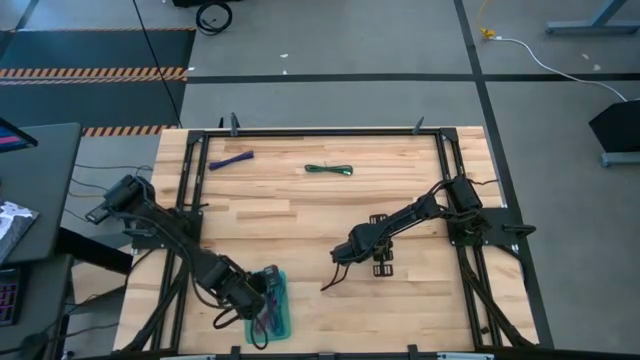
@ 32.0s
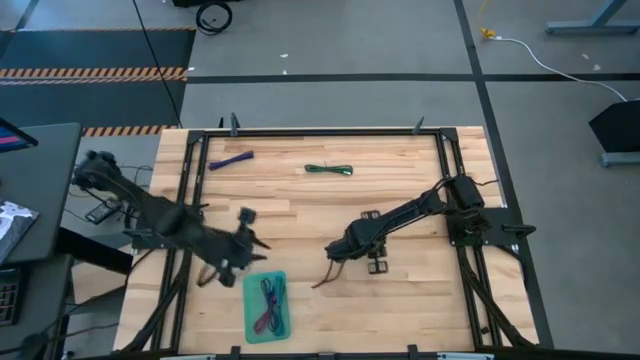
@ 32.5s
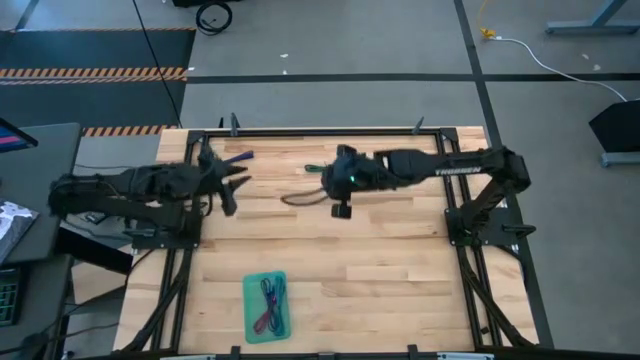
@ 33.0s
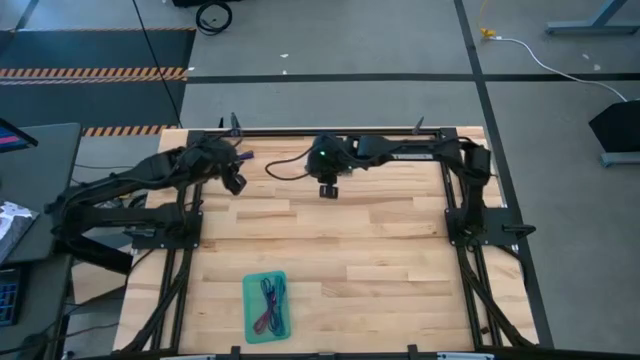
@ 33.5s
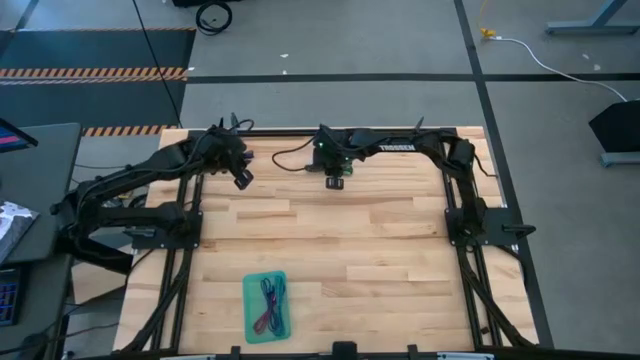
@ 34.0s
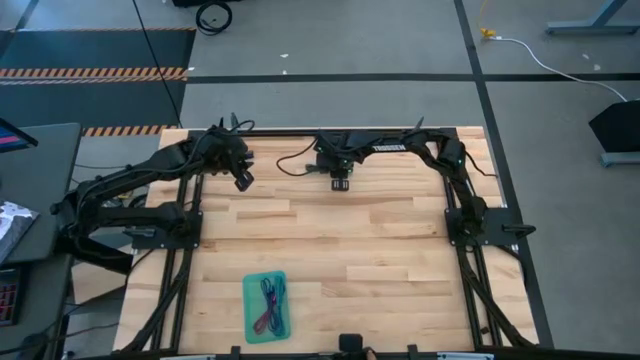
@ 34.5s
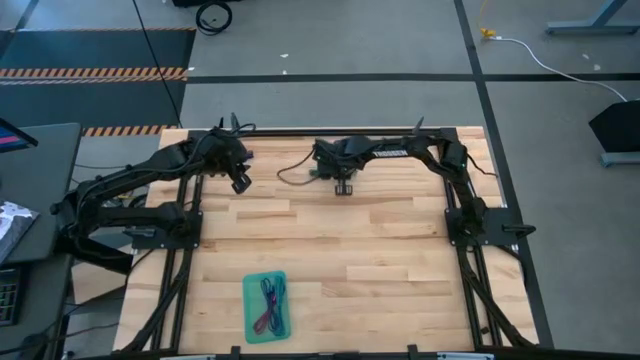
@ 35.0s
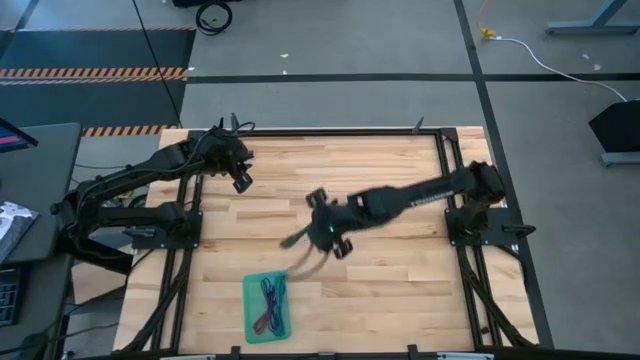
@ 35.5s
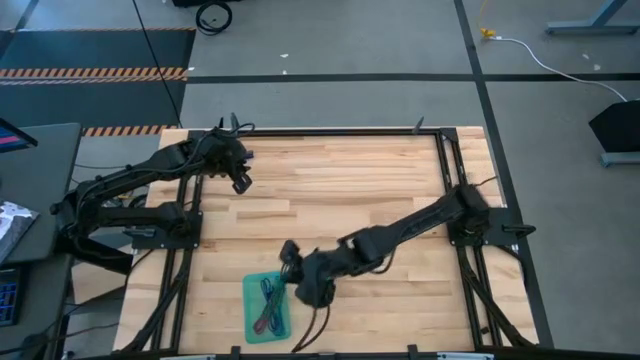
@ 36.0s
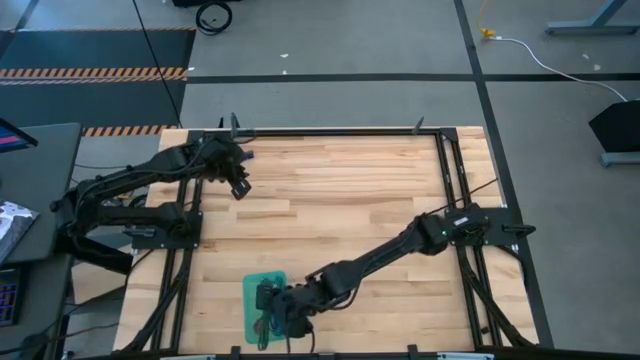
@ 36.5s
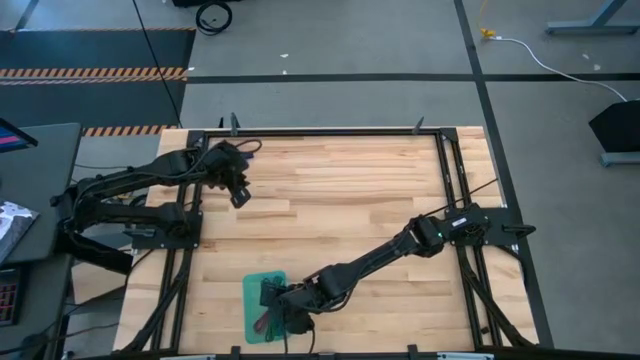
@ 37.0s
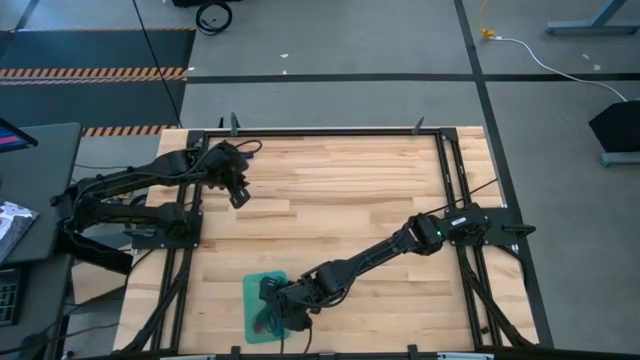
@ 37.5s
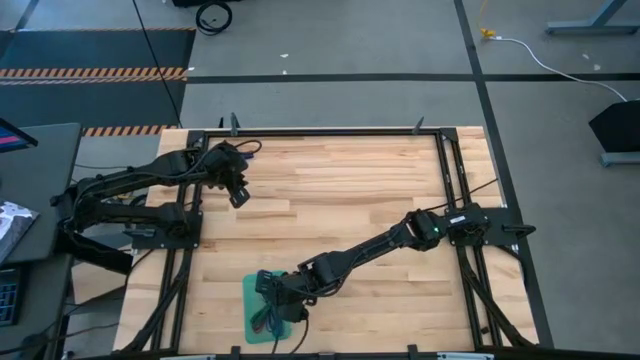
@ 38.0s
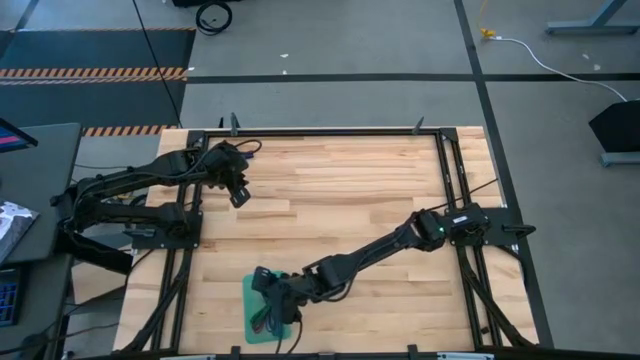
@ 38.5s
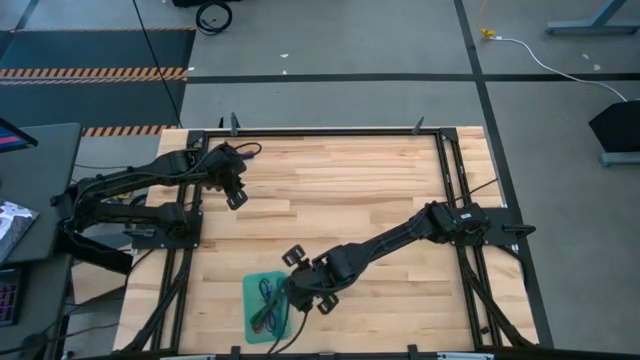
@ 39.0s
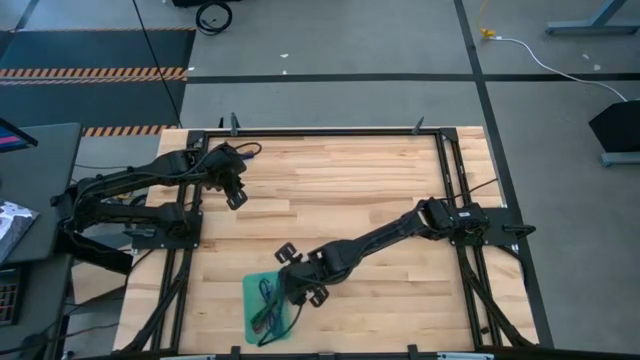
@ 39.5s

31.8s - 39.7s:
Task: Pick and place USB-C Cables
Put the green charger cable into the green bin

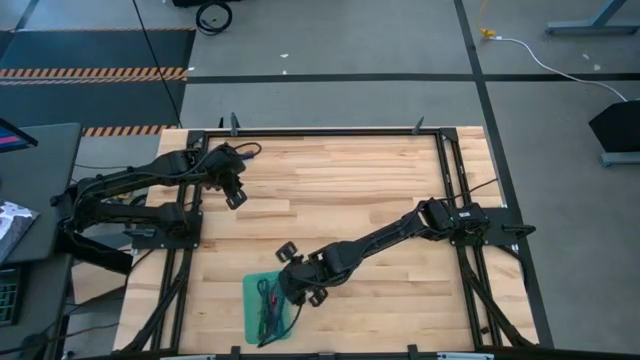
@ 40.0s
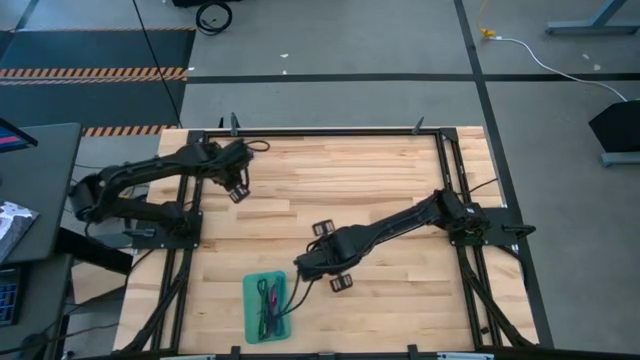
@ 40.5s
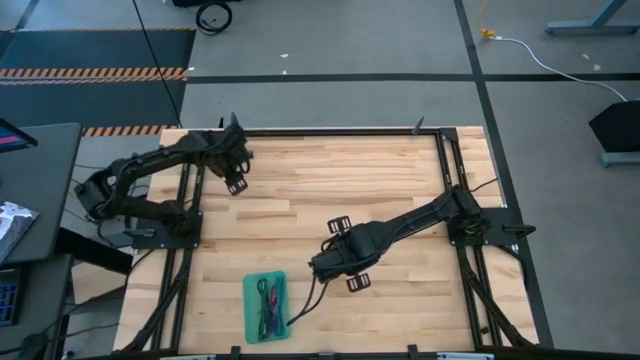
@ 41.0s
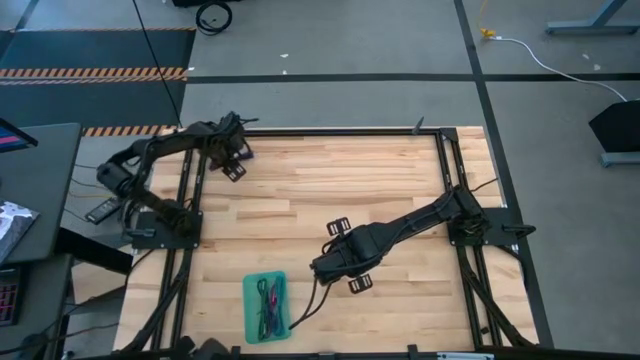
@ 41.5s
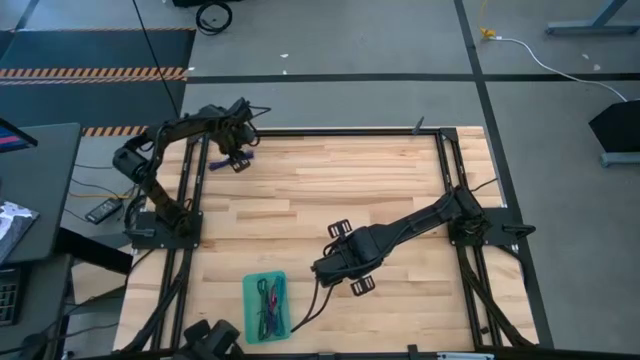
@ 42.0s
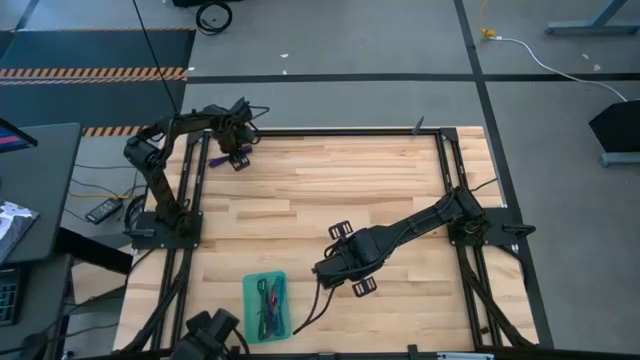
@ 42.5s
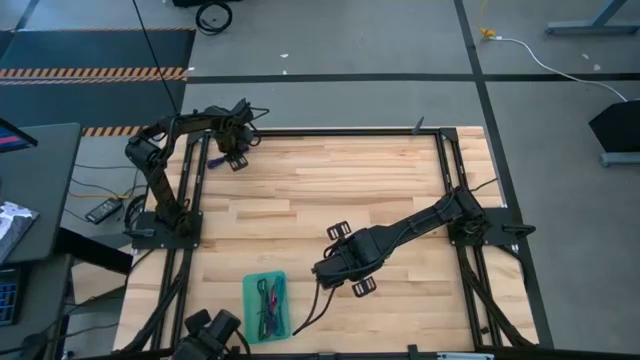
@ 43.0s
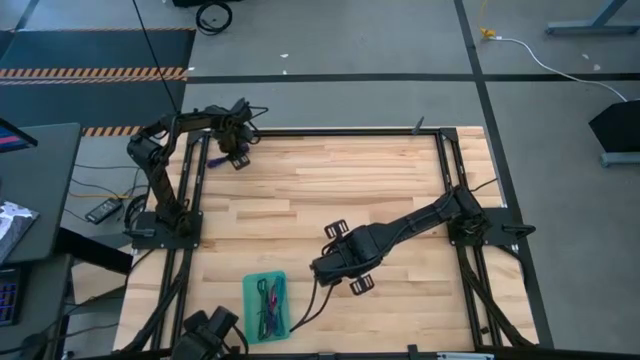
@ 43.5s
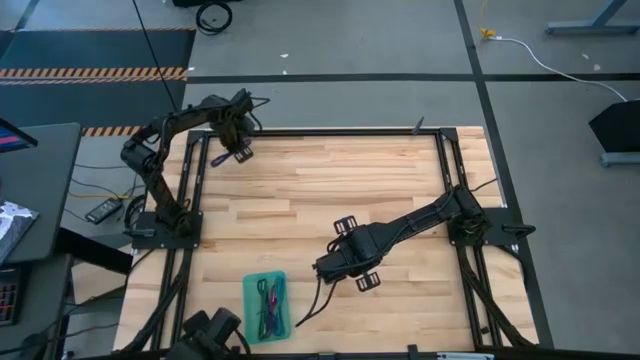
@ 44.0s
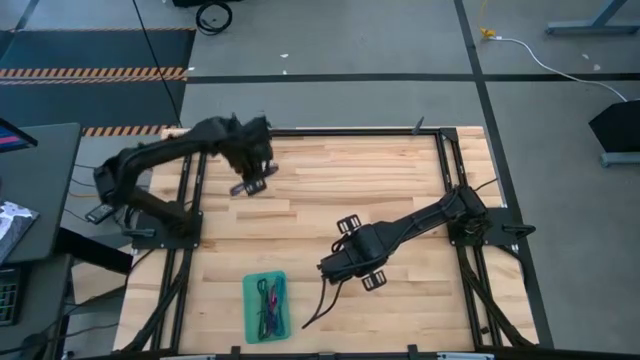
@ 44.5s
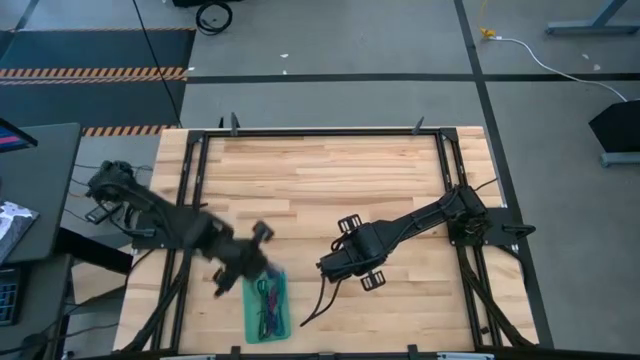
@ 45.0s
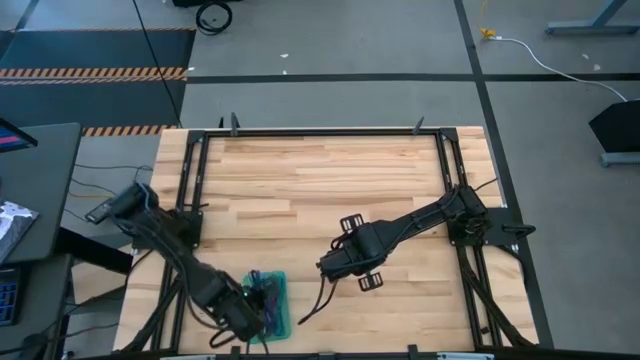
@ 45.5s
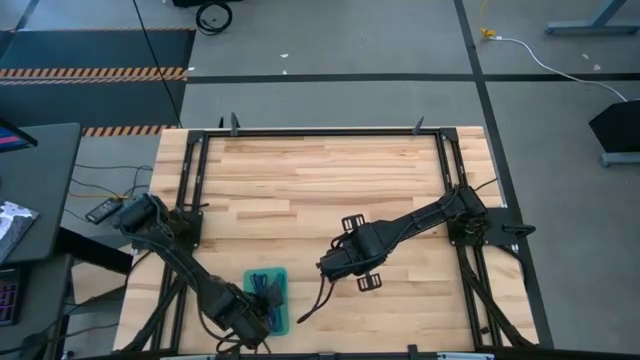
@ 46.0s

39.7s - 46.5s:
Put the purple charger cable into the green bin

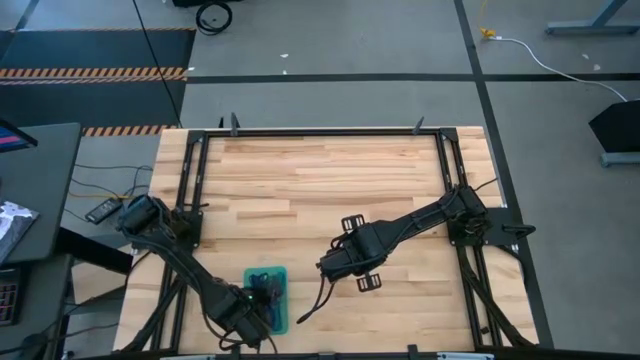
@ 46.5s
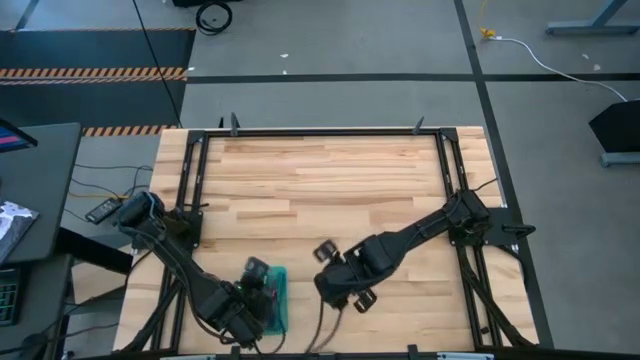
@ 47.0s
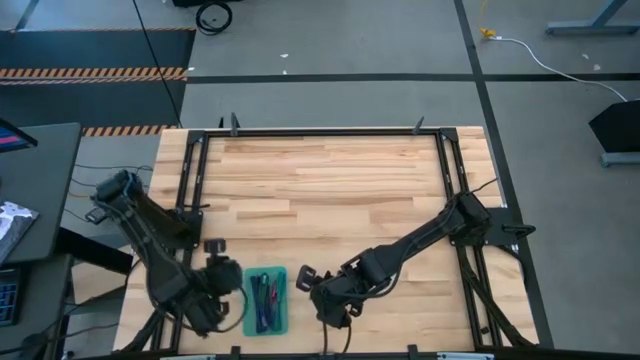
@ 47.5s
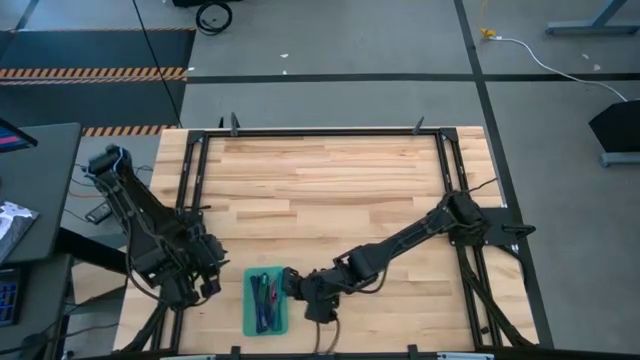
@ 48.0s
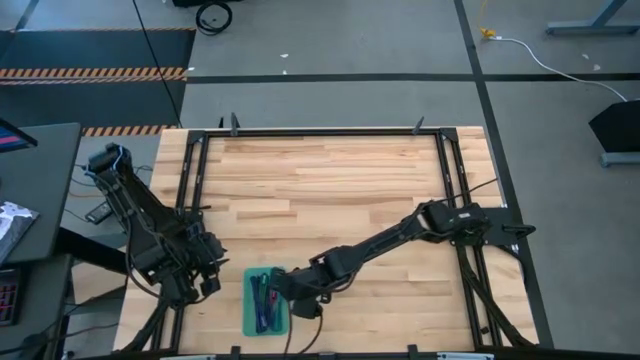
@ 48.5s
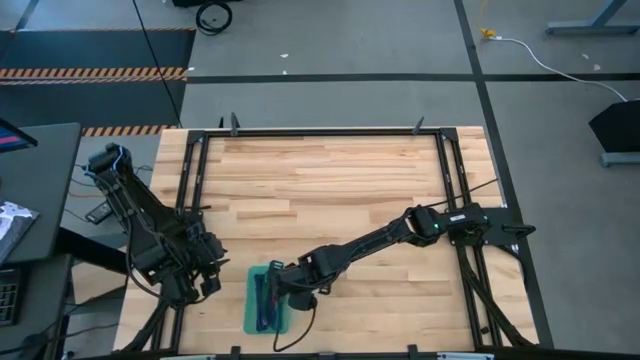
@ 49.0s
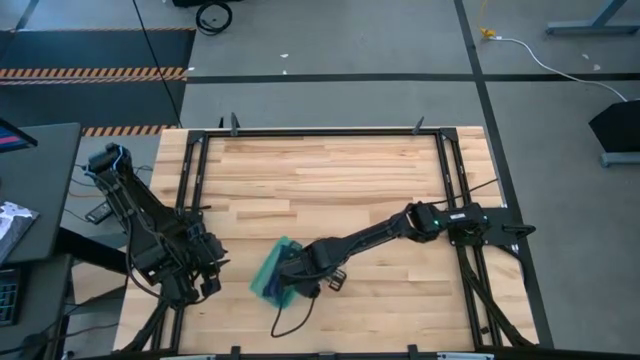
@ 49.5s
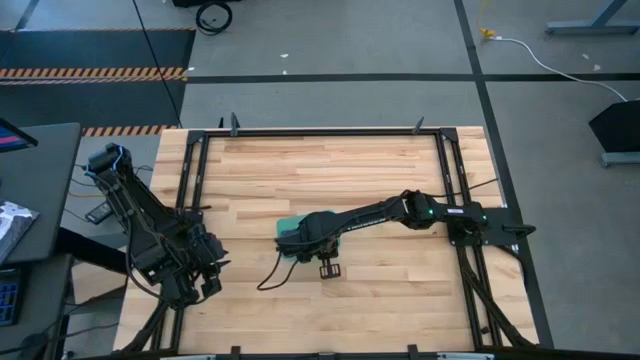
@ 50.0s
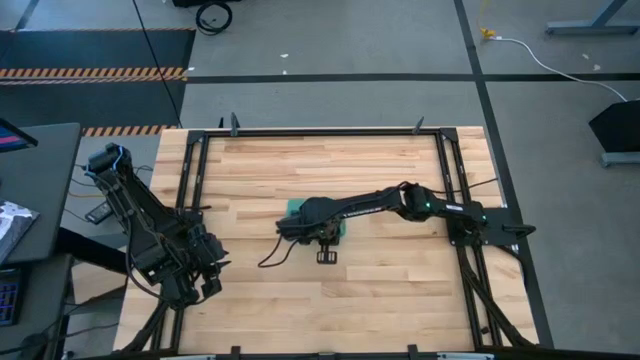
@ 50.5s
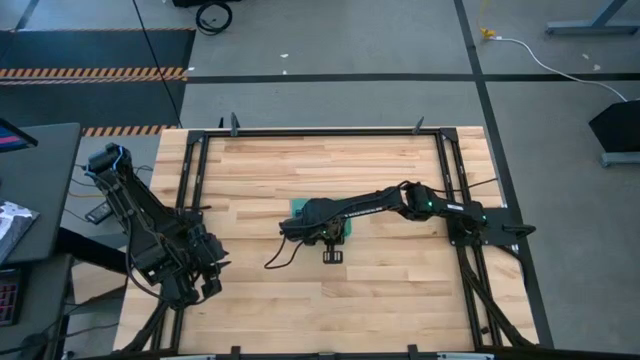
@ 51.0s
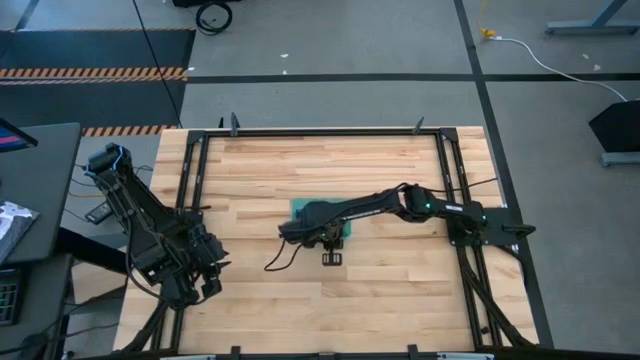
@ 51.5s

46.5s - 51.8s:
Move the green bin to the center of the table
